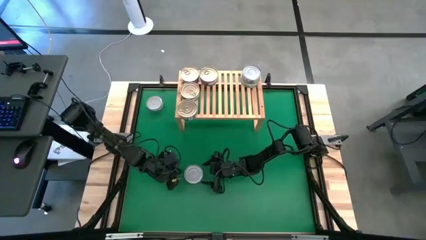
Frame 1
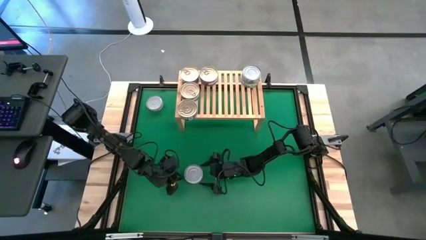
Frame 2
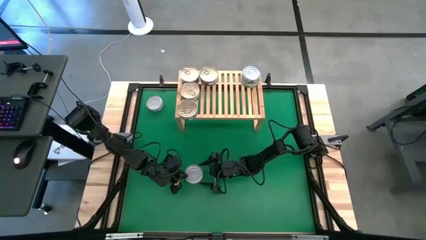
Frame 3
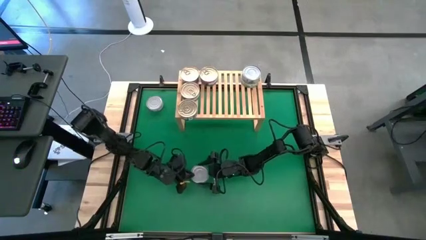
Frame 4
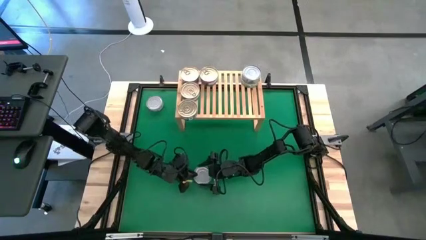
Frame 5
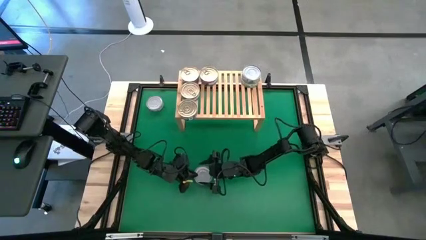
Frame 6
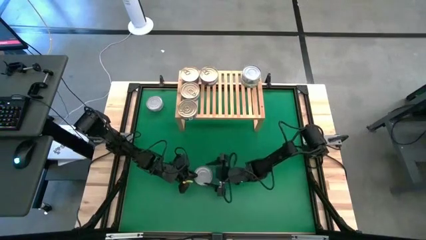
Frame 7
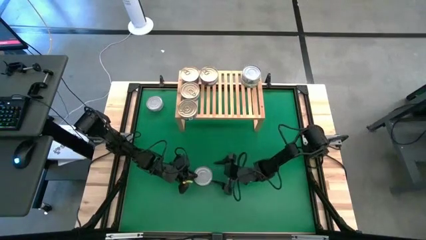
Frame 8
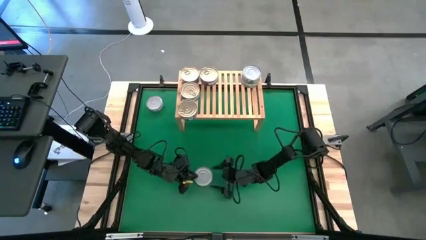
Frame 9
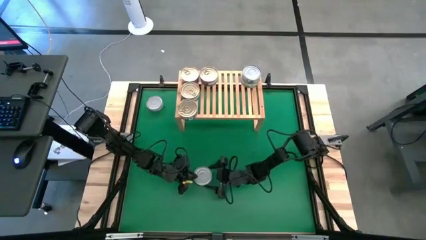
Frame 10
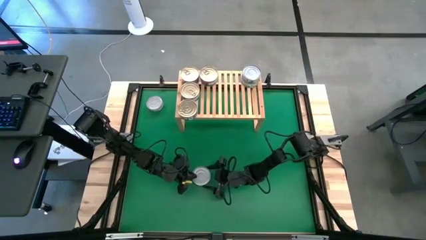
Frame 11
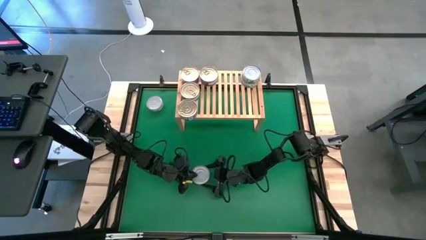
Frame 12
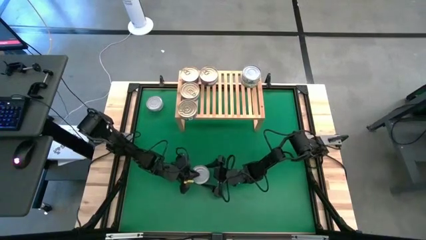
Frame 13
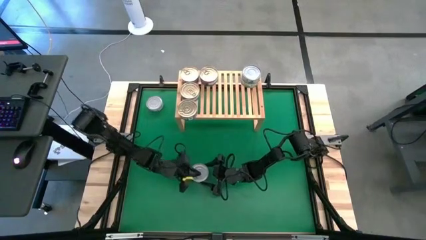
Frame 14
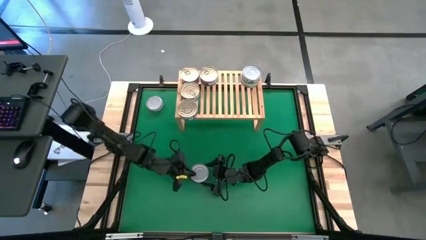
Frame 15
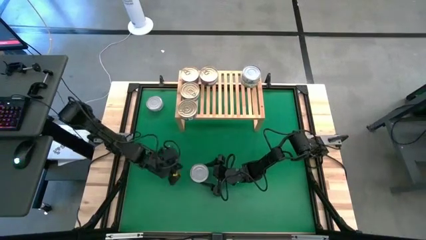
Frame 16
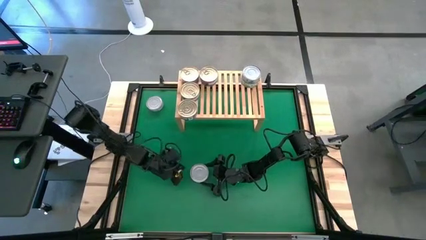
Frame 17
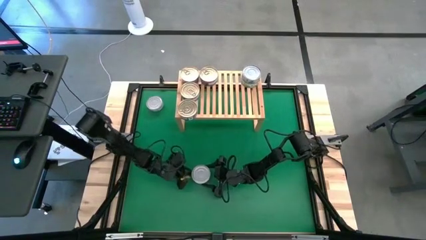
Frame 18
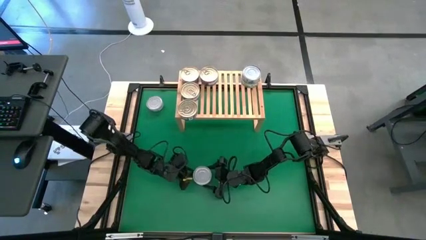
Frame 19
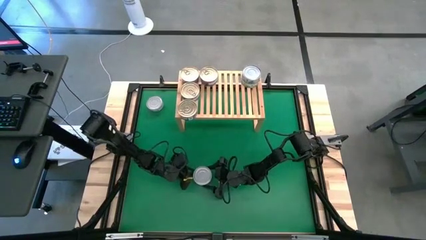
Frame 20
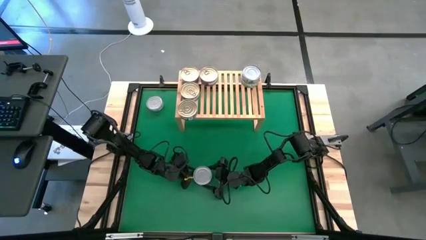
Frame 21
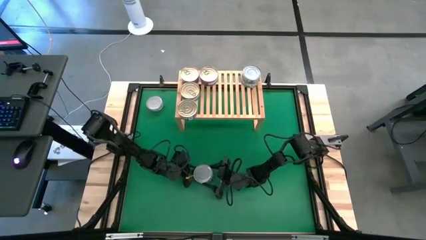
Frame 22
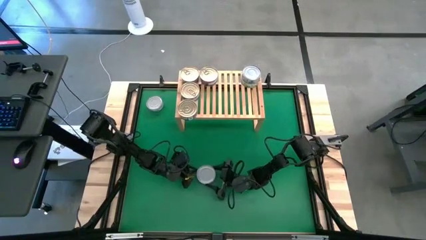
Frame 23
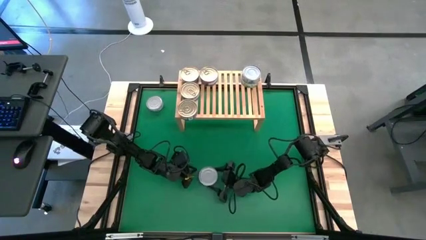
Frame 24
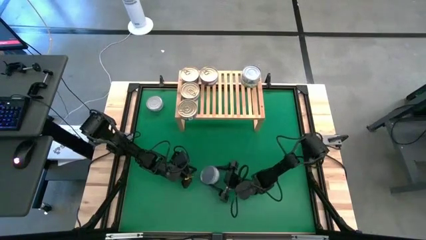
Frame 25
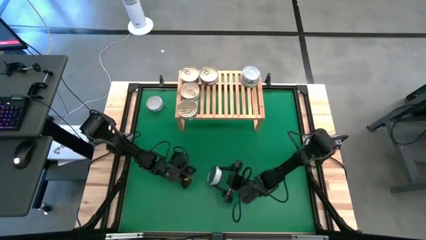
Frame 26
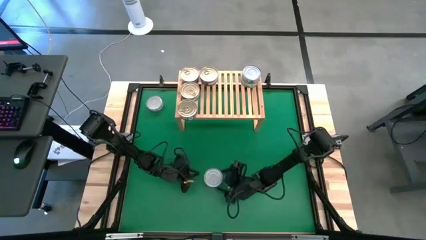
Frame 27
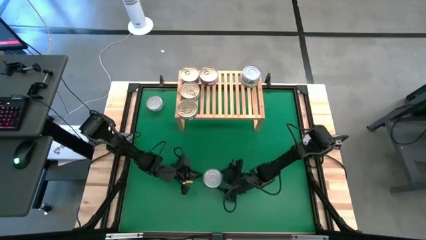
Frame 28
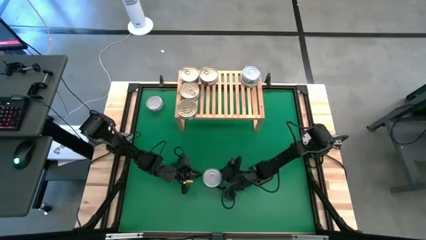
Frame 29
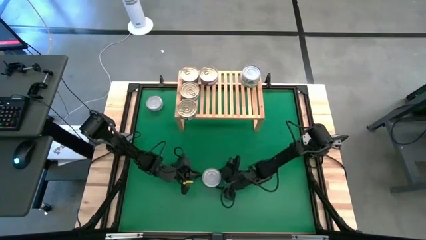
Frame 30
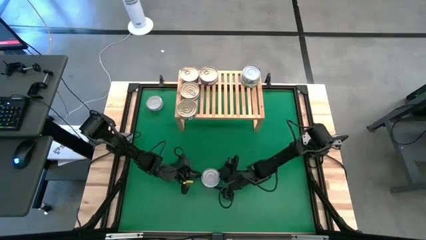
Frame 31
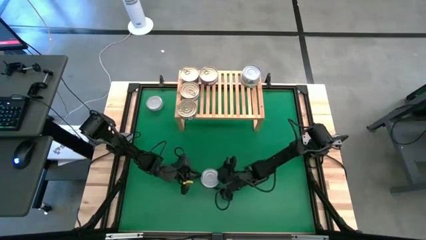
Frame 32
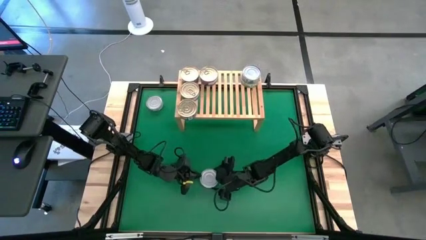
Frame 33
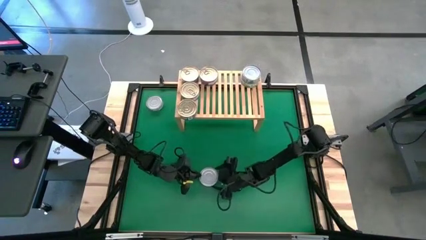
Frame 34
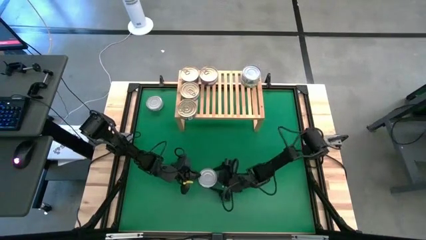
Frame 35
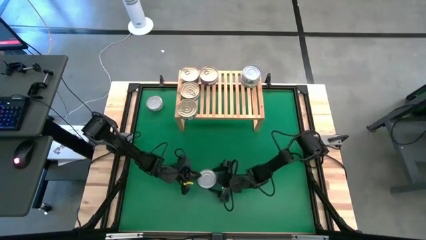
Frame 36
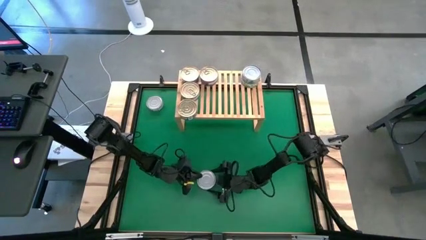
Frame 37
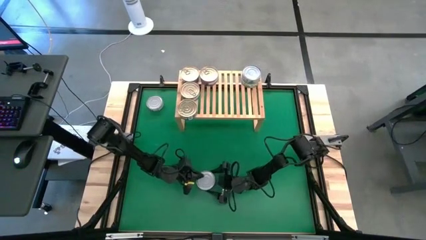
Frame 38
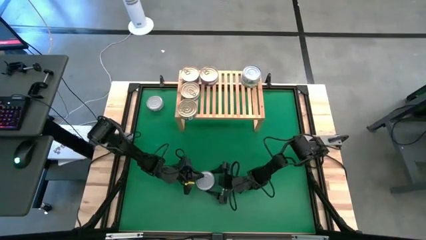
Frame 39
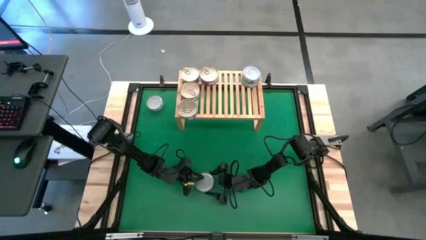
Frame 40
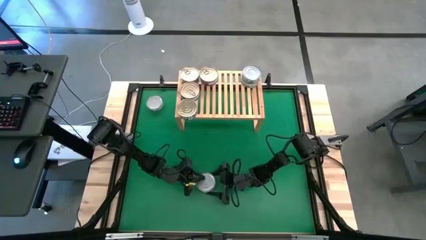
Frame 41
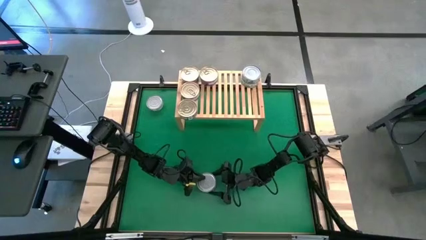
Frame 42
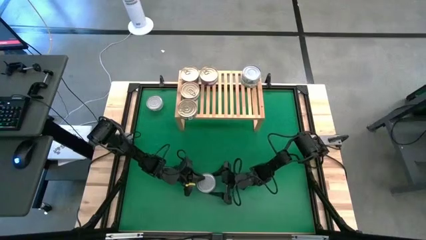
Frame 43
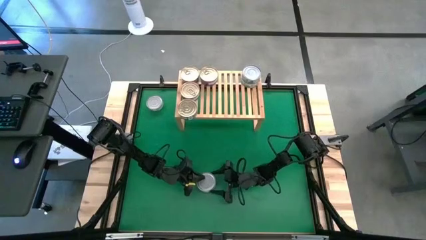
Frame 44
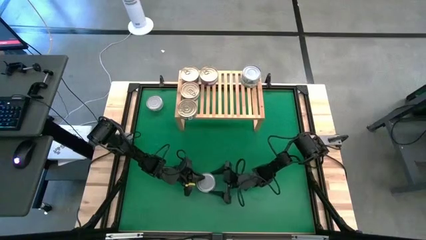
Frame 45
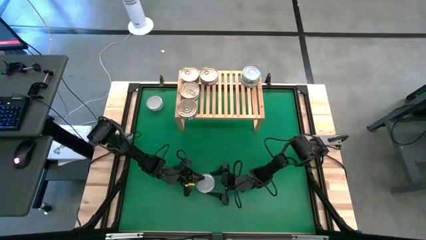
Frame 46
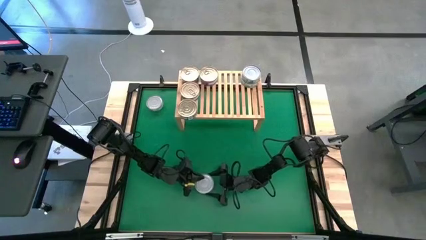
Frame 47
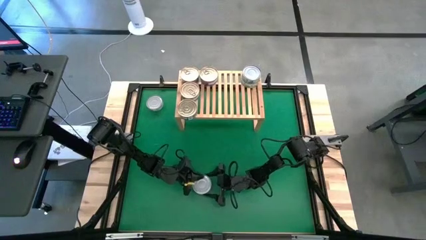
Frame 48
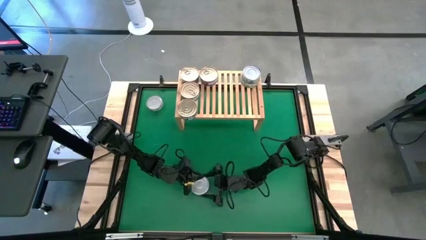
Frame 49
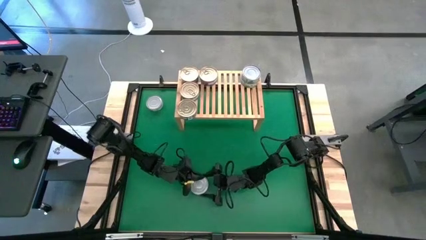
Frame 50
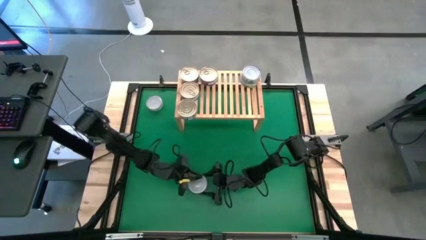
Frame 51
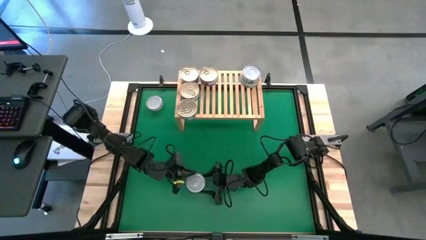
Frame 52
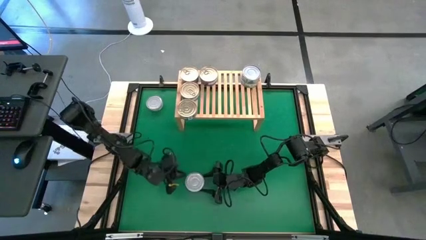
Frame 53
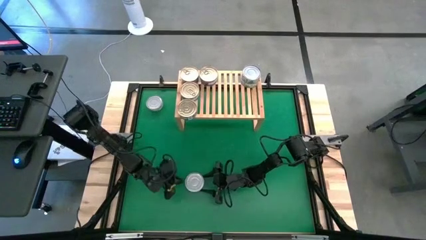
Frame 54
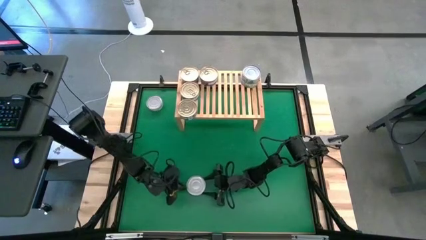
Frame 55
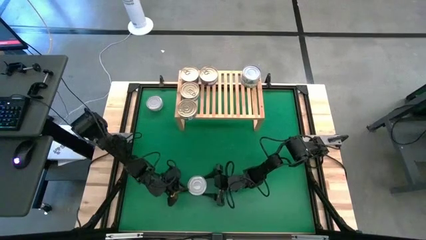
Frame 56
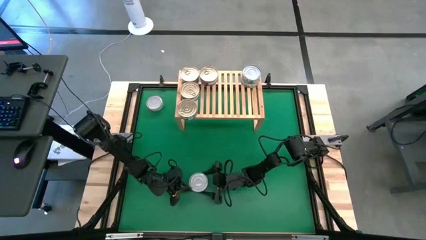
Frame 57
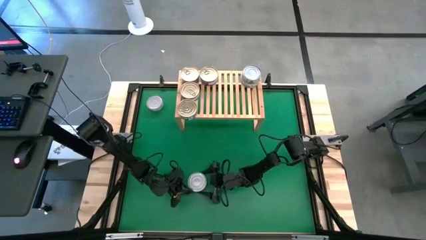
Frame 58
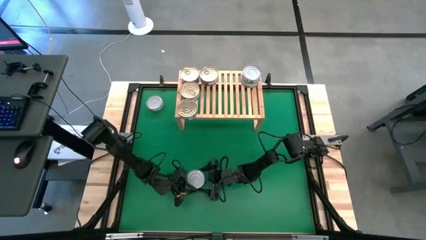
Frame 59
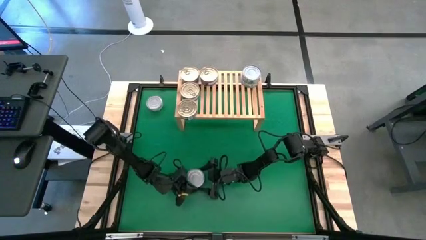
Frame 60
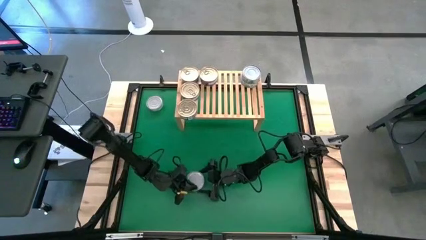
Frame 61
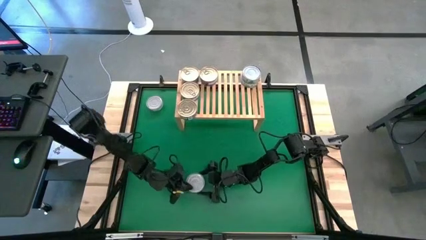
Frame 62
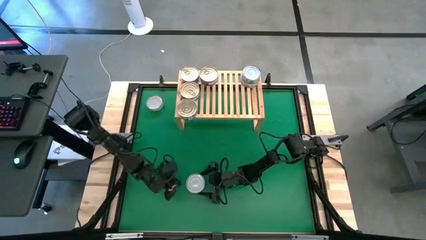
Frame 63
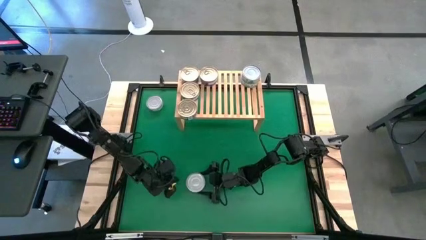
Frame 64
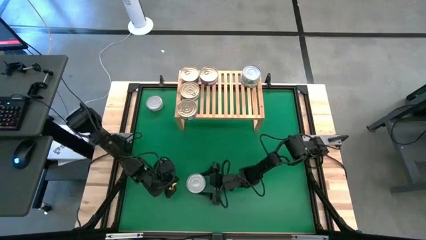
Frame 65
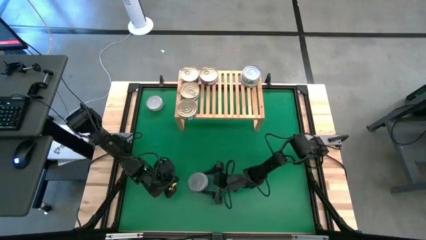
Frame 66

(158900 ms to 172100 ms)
Task: Stack canned seafood by type on shelf
Put the center green tuna can on the shelf aligned with the other green tuna can

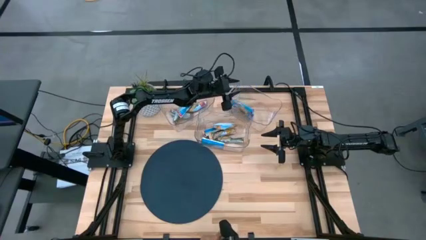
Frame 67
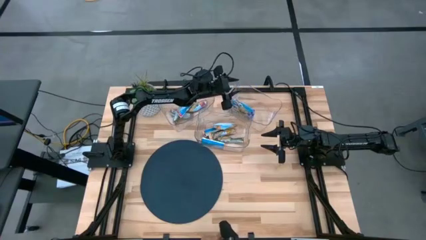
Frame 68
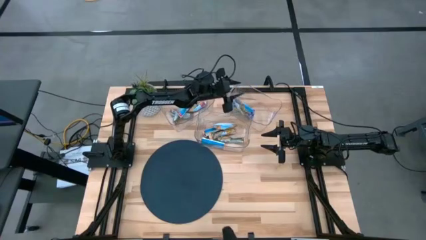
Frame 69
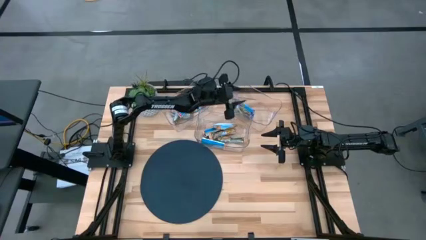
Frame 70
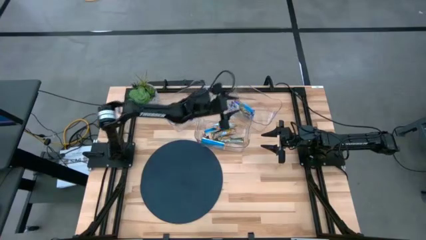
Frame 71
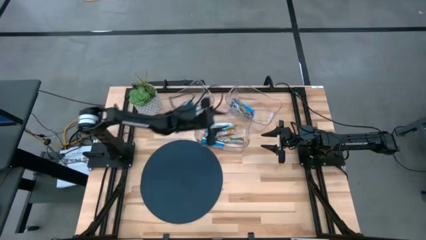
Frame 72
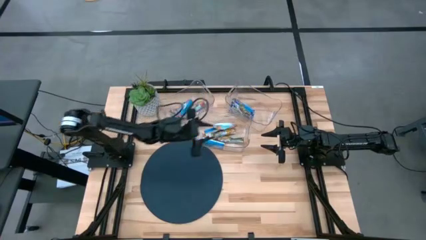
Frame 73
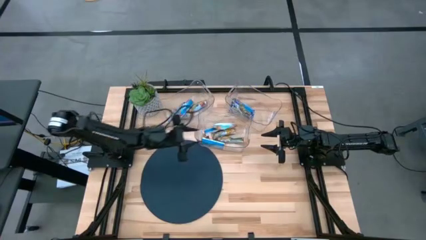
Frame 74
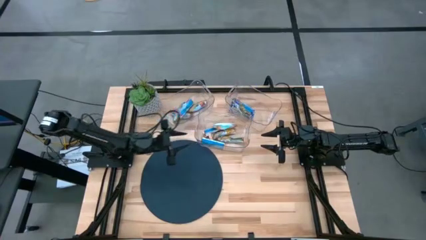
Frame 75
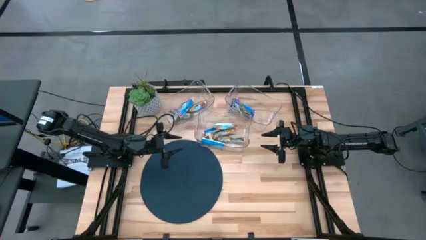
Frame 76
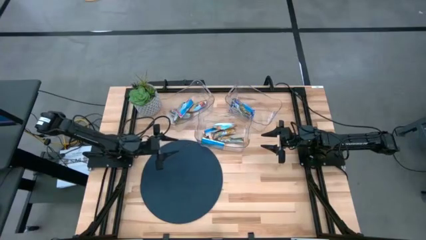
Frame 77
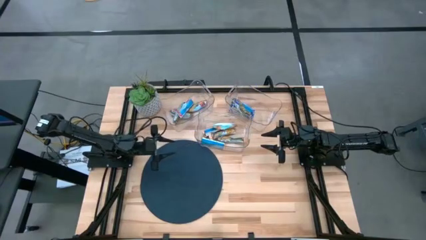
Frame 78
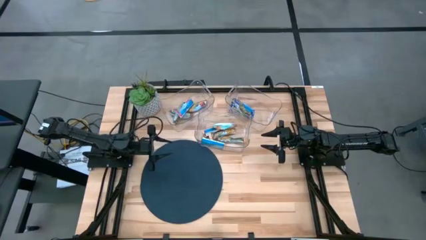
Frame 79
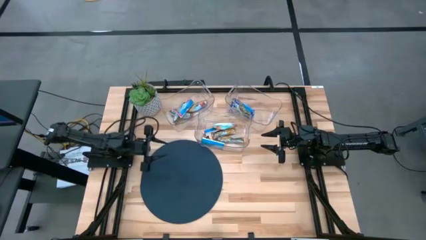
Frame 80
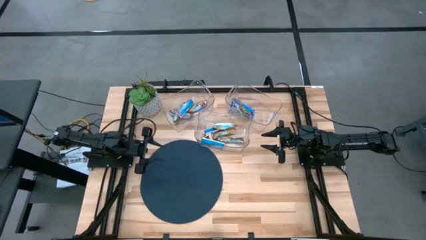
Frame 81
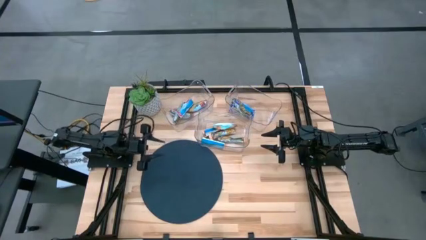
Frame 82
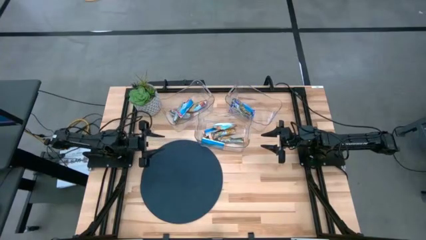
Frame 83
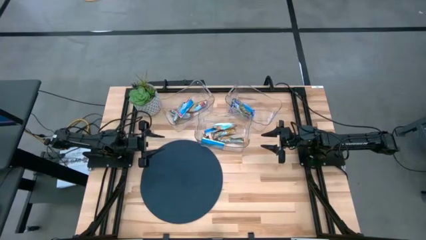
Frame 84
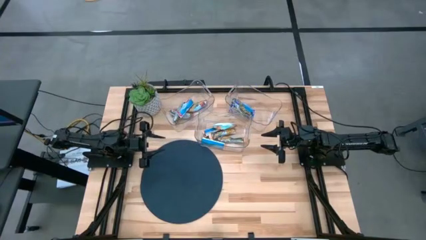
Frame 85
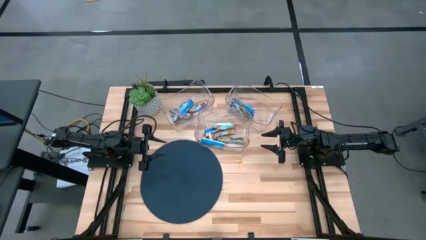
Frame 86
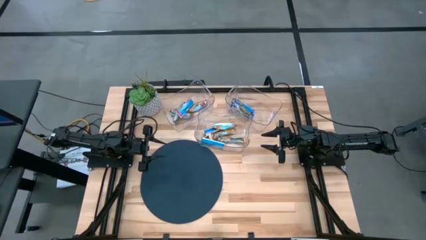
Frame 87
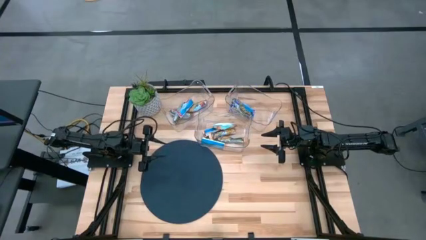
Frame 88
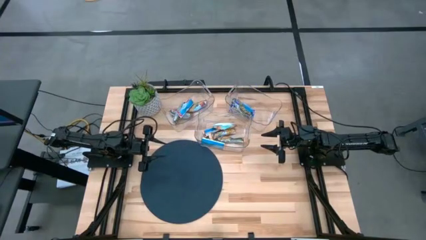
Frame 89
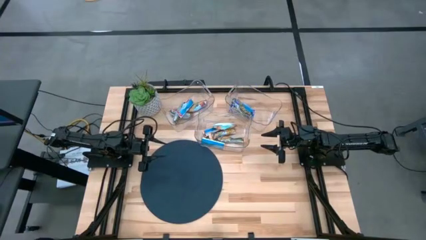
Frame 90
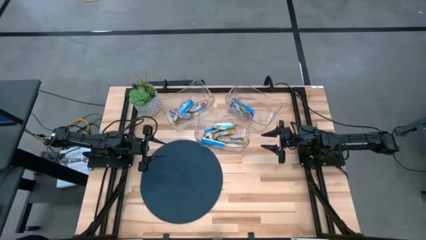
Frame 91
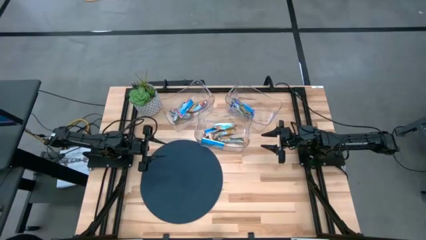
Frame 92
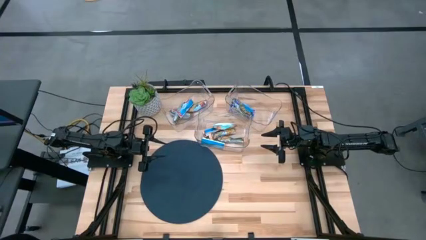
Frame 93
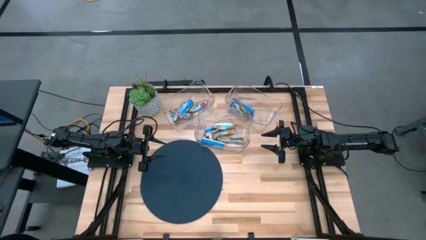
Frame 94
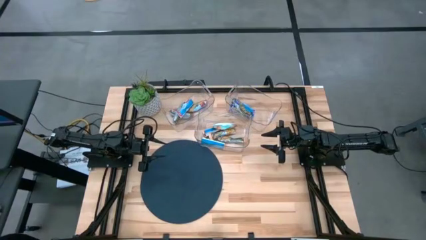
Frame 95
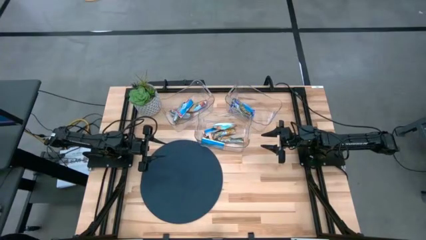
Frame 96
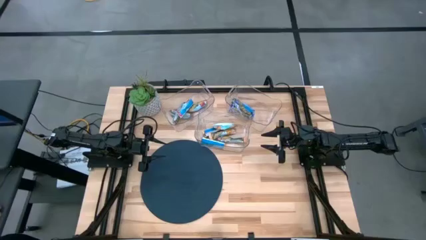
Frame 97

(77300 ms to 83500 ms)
Task: Pick and place Granola Bars by type
Return to Home Position
